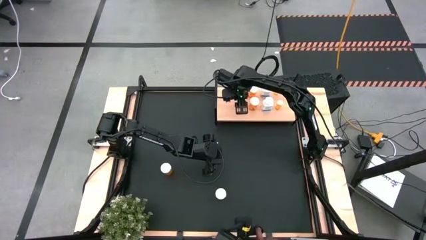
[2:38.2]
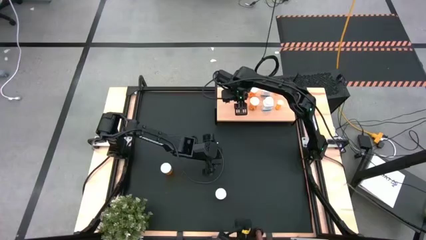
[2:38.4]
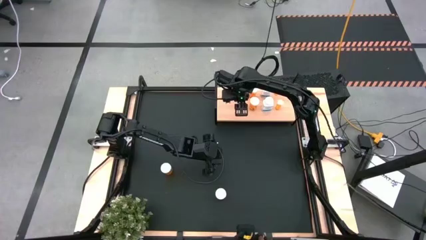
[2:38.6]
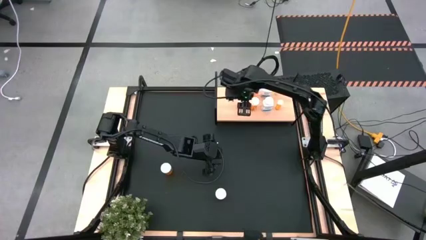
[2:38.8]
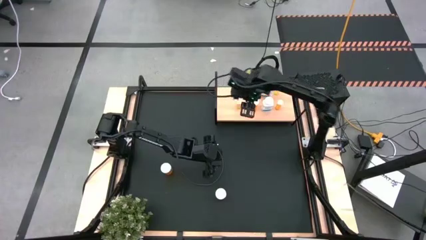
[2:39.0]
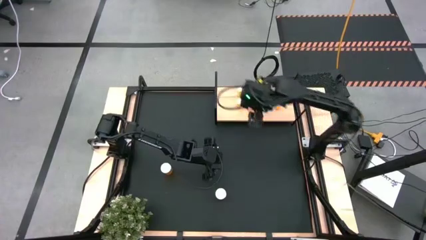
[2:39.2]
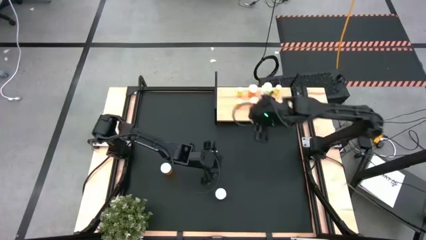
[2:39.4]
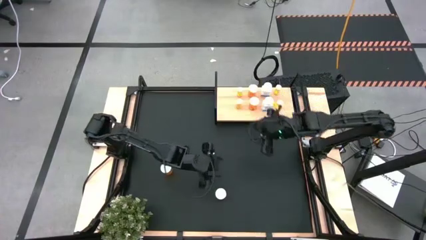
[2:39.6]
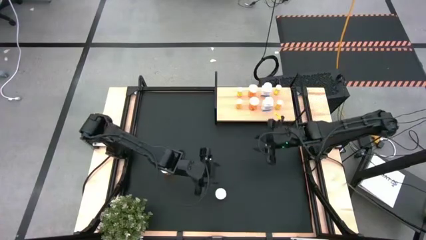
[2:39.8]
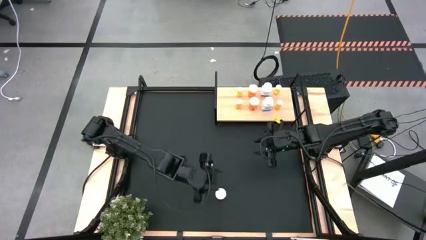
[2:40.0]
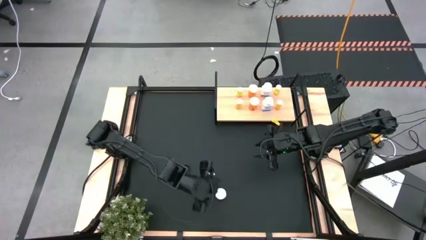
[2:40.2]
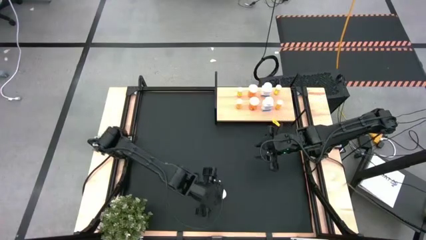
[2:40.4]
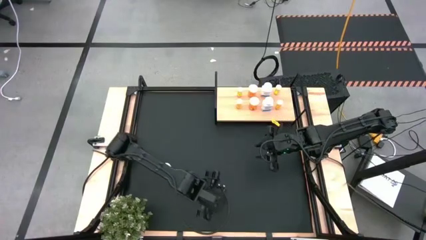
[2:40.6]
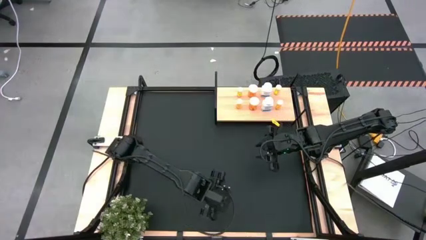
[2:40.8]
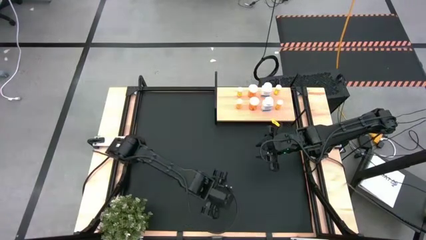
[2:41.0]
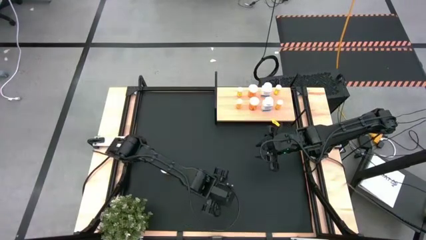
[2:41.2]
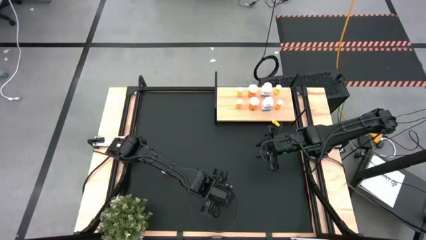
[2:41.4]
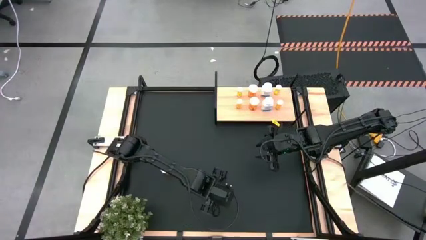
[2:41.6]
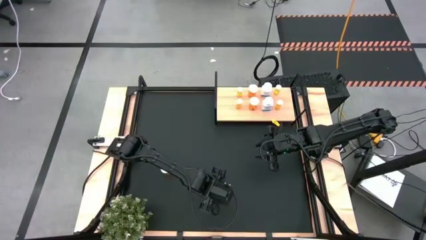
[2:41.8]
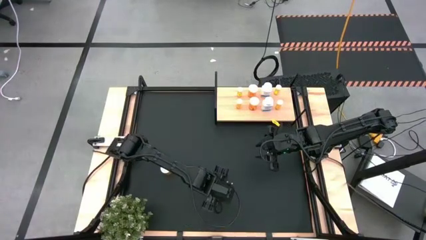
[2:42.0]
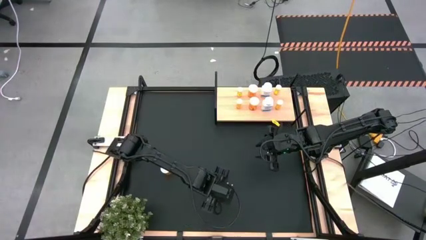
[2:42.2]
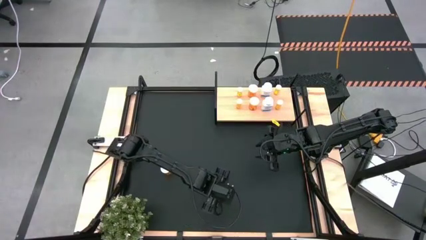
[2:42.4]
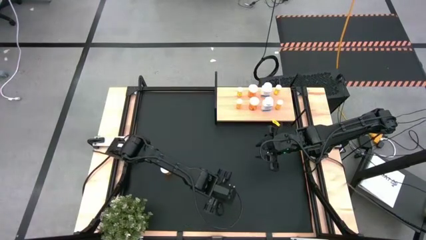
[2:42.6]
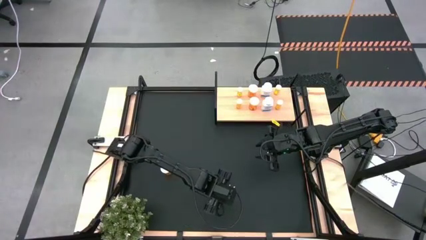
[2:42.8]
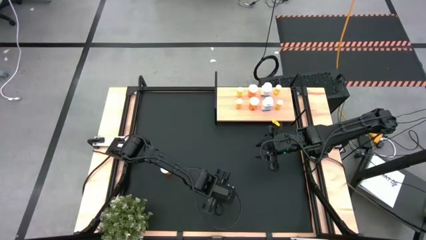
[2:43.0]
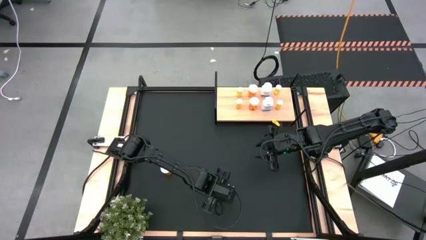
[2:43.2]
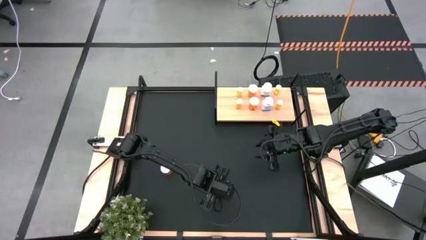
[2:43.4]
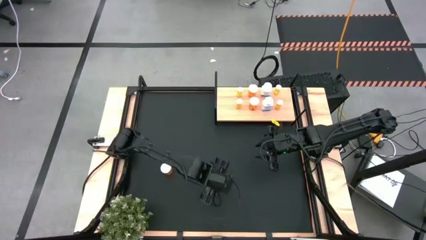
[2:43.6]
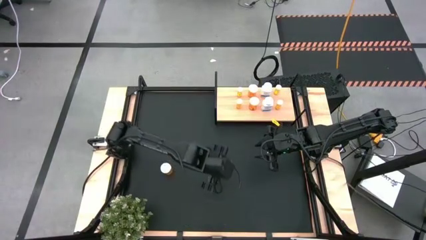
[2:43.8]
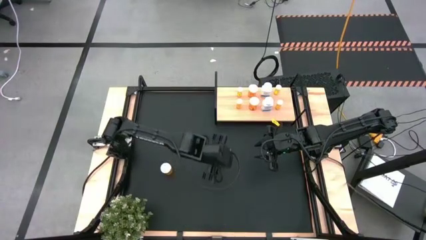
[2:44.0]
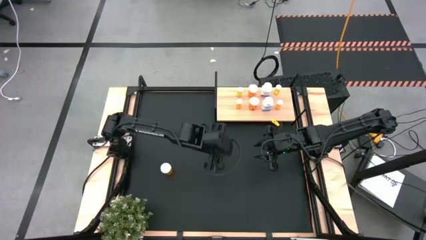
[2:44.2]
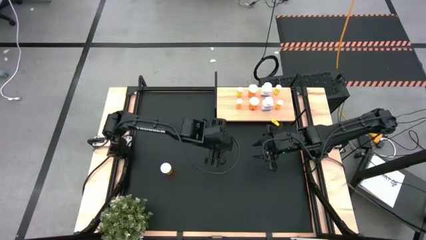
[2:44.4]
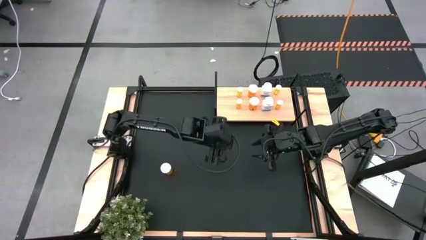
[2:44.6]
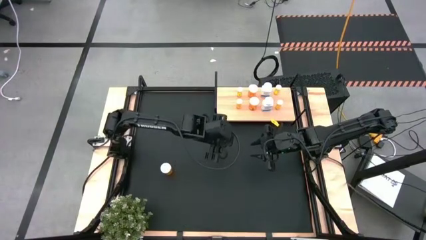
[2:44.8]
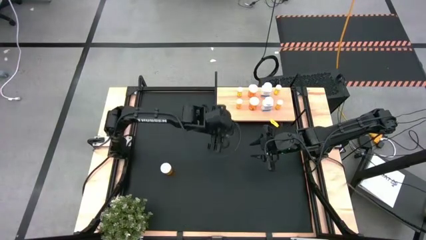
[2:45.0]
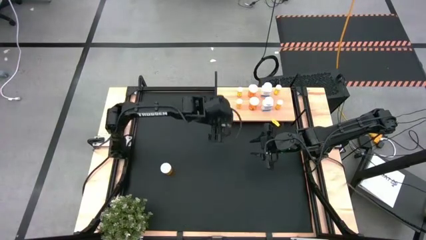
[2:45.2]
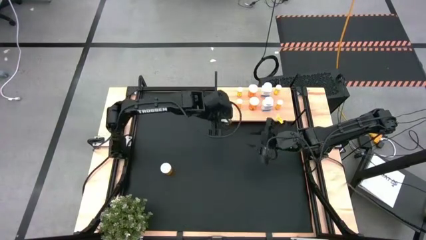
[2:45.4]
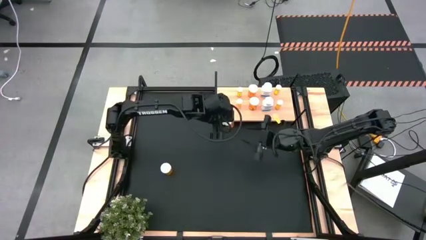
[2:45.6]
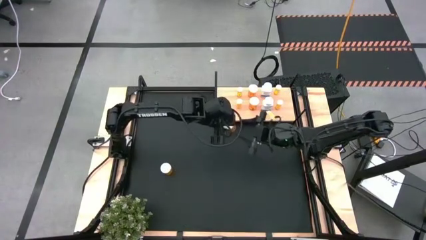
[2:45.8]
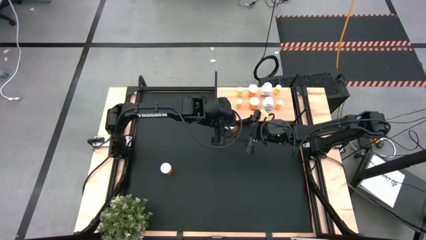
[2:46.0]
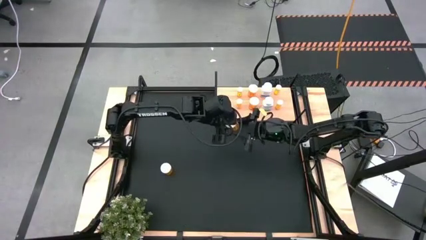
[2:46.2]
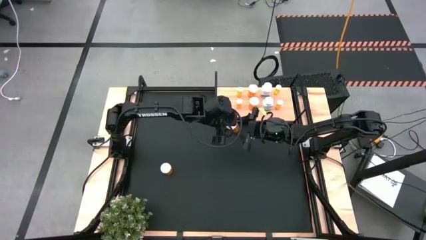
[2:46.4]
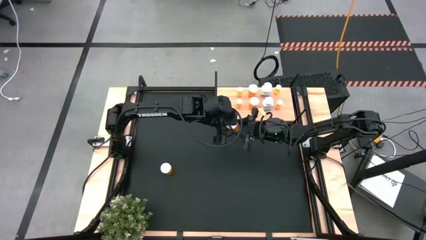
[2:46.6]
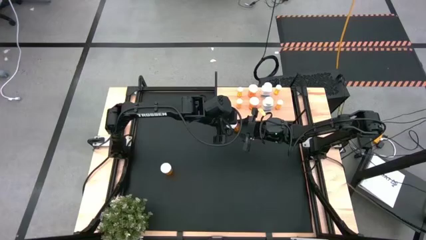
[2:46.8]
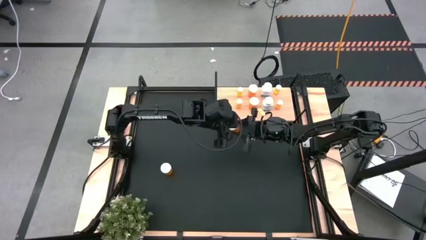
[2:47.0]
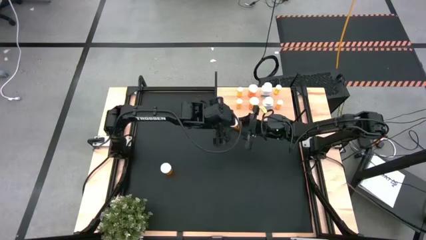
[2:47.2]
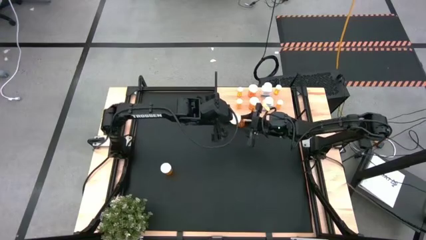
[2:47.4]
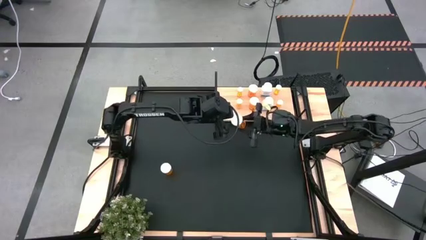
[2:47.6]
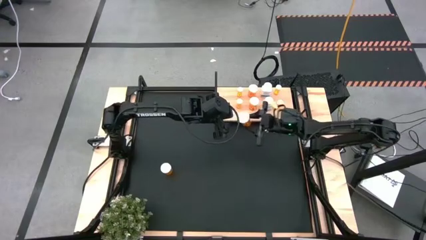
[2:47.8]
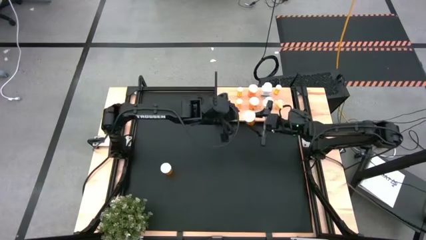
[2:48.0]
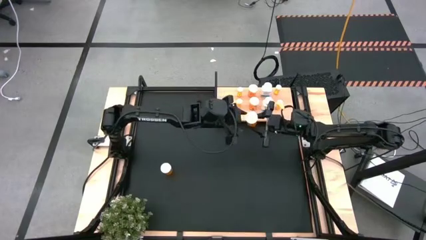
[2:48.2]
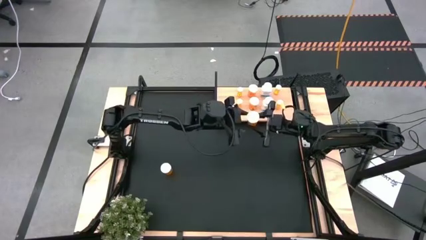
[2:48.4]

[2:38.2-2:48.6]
Task: Pick and place medicine bottles onto shelf by color
Put the large orange pill bottle on the shelf

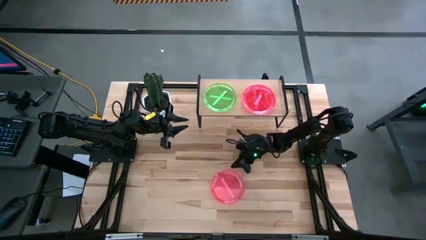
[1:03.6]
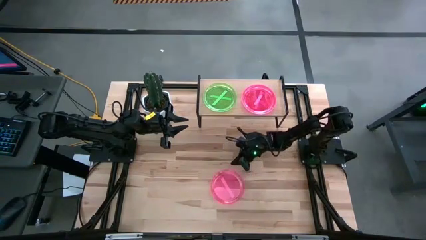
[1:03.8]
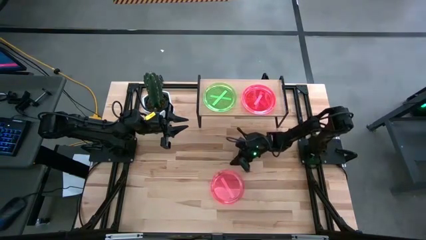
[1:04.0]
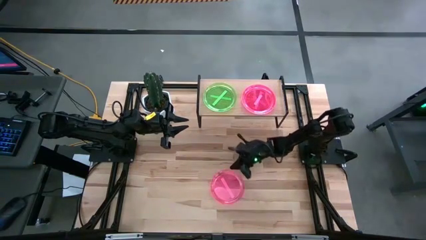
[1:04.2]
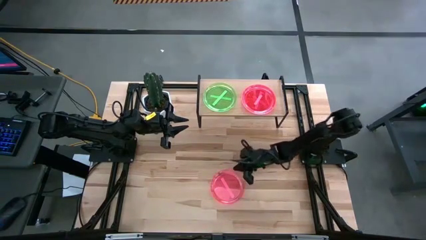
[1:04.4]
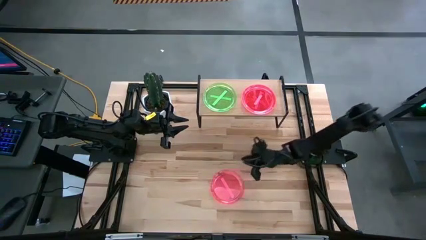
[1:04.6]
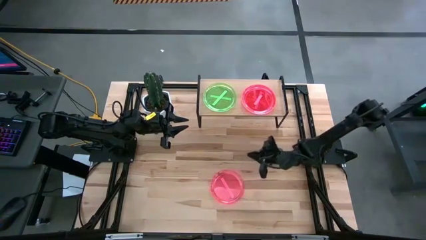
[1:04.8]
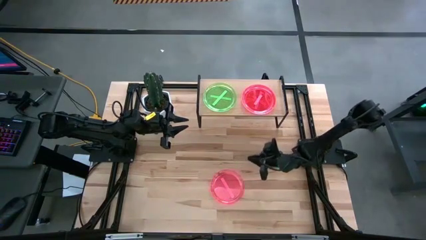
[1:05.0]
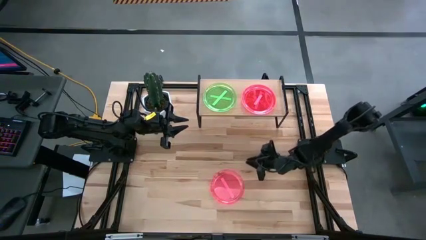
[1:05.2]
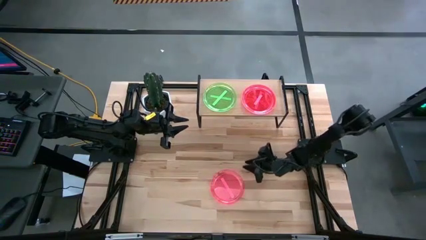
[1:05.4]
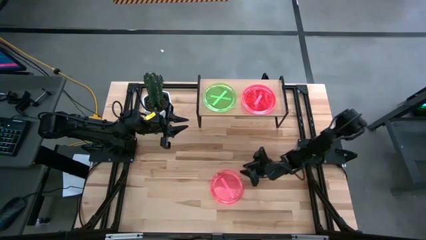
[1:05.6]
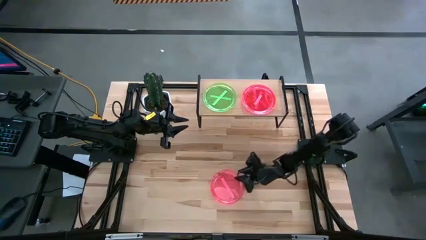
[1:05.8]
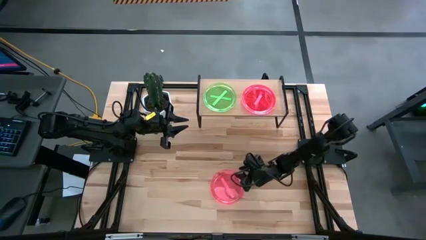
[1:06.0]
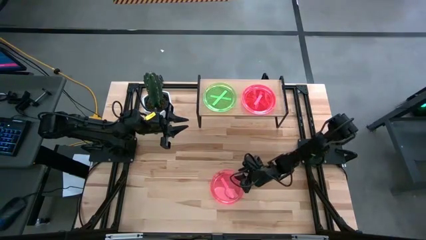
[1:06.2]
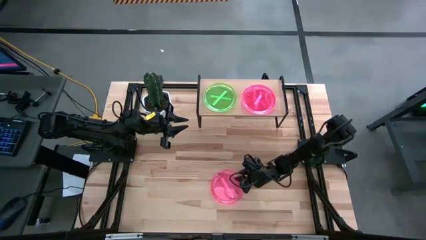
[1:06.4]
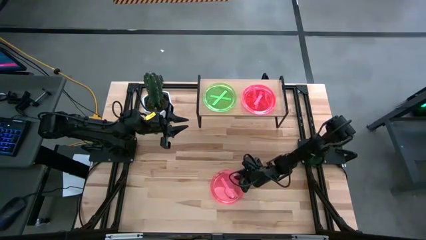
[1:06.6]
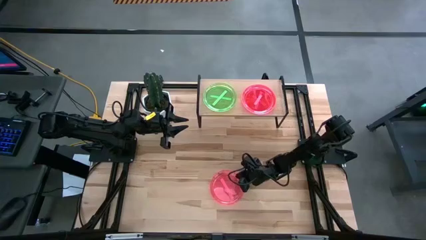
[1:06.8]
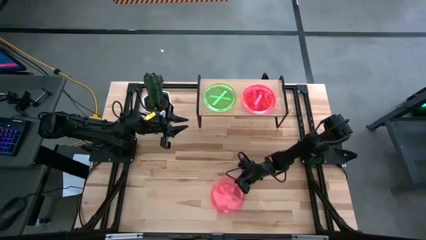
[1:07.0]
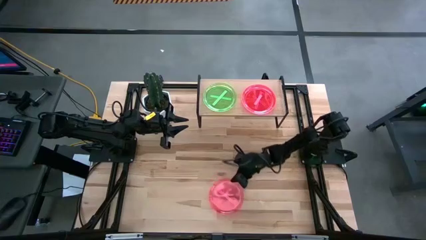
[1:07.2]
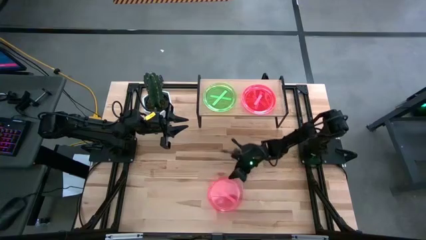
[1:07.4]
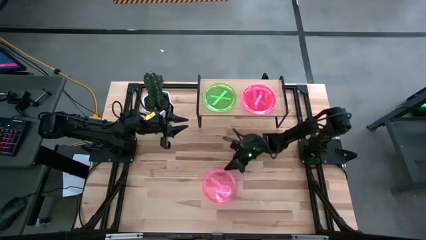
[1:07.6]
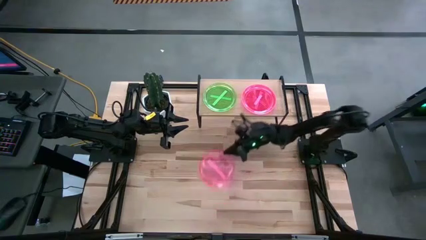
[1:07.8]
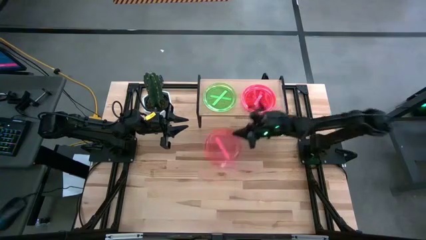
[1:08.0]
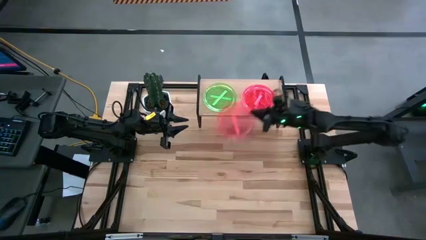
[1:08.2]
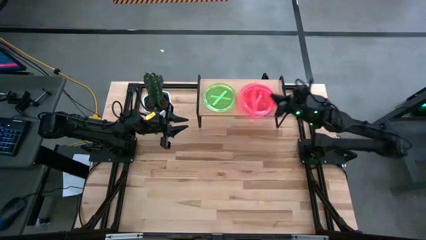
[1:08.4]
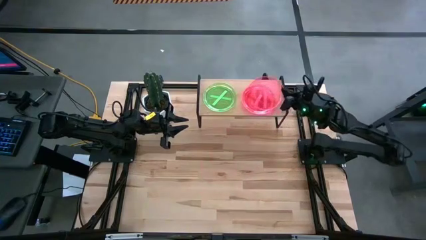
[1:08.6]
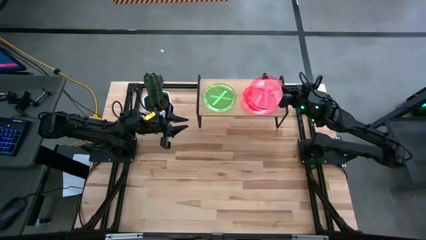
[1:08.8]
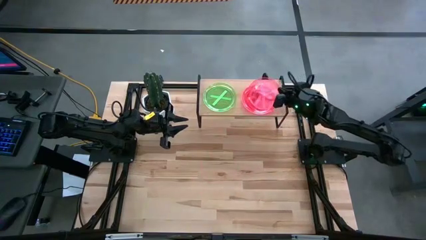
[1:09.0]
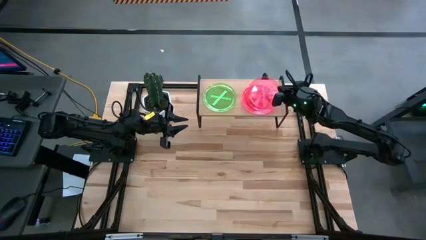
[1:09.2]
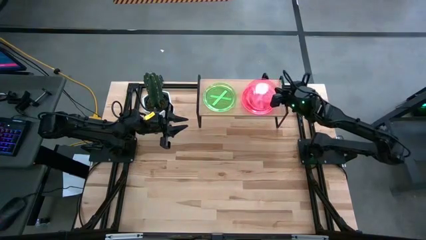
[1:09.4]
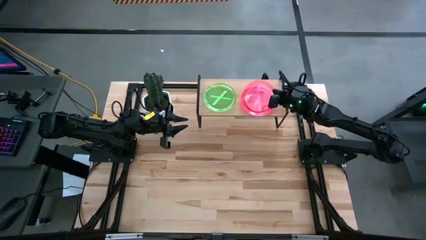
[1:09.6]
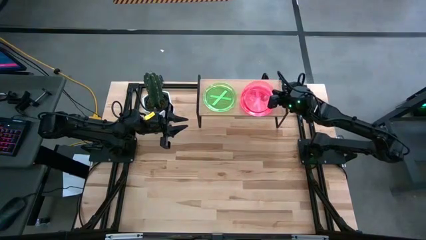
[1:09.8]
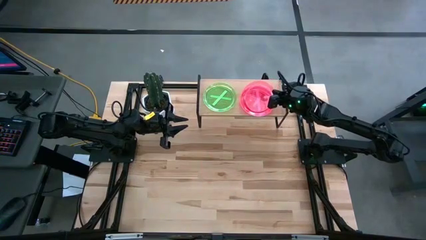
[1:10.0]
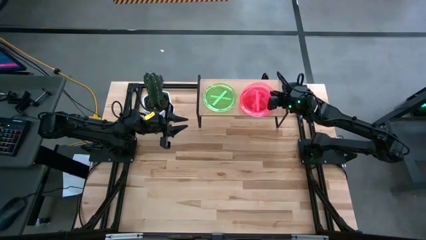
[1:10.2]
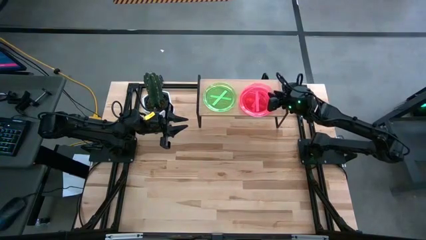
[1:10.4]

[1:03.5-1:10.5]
Task: Place and stack plates onto a shelf
Stack the pink plate on the pink plate on the shelf
